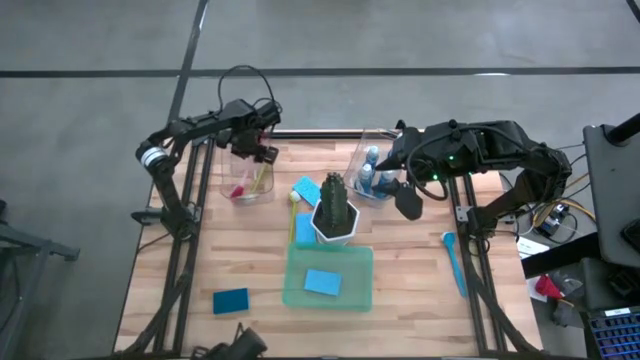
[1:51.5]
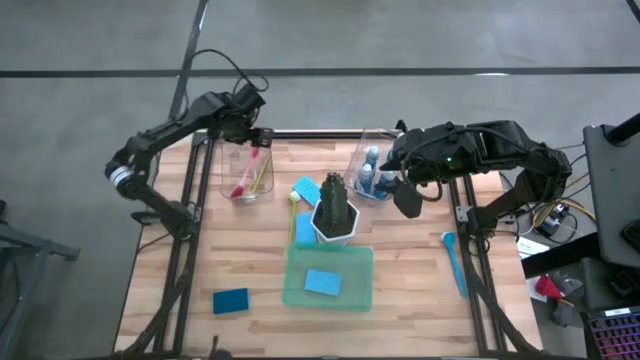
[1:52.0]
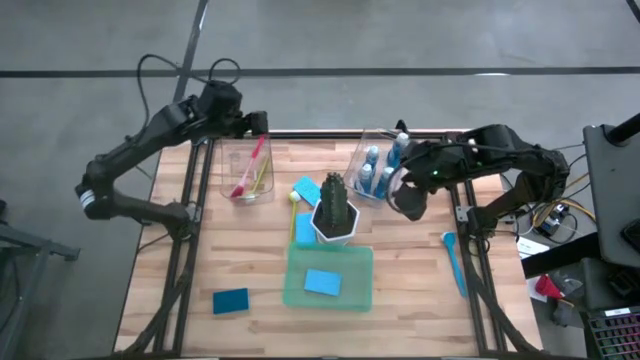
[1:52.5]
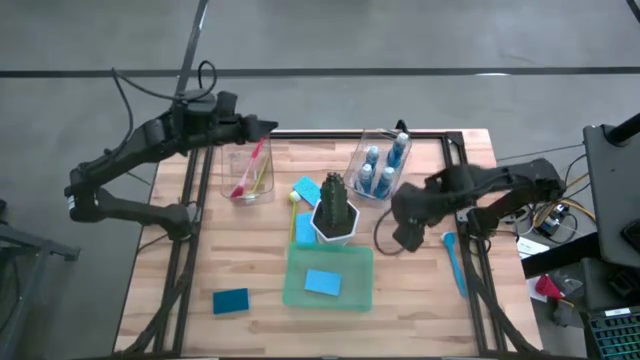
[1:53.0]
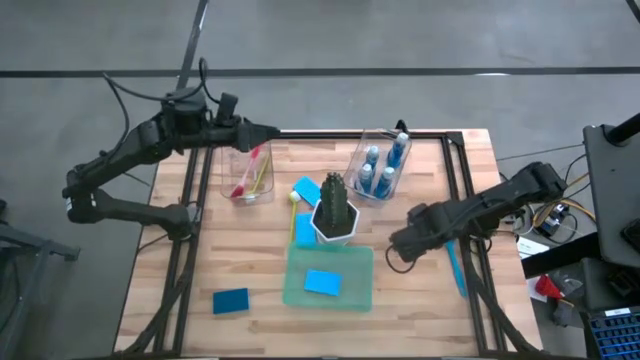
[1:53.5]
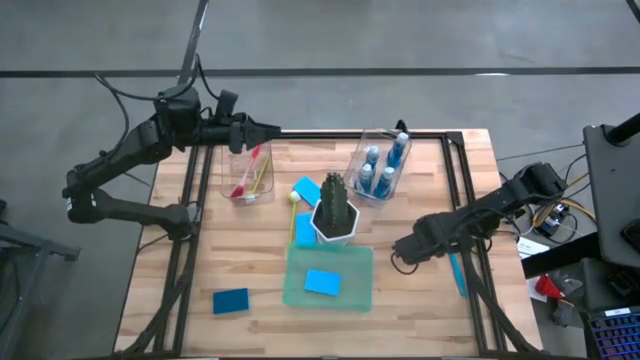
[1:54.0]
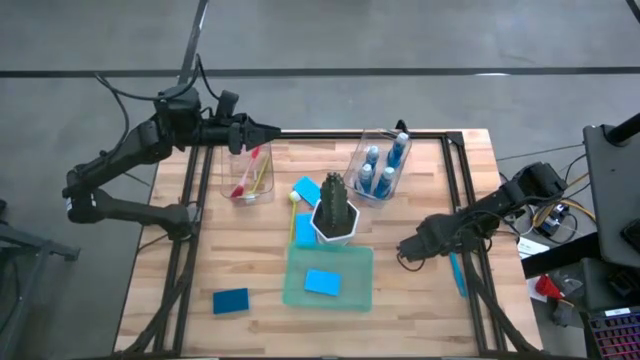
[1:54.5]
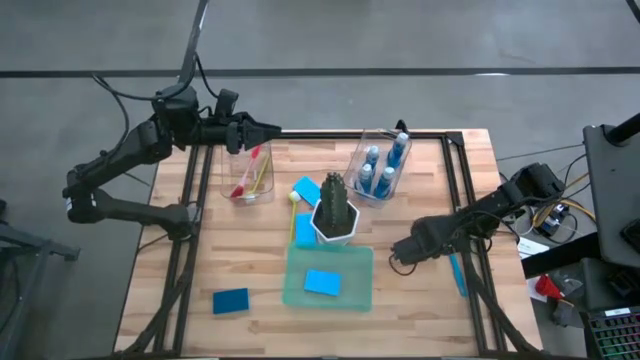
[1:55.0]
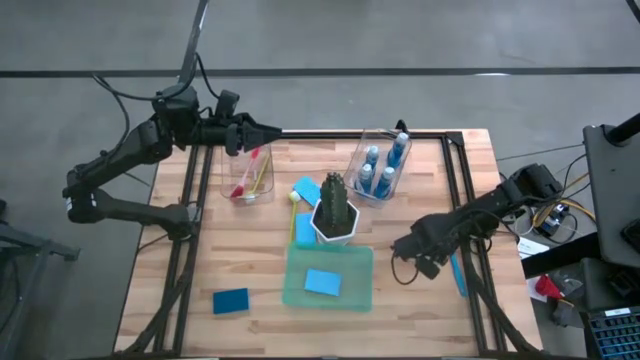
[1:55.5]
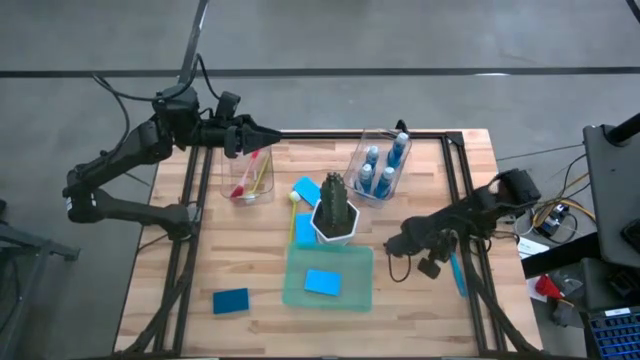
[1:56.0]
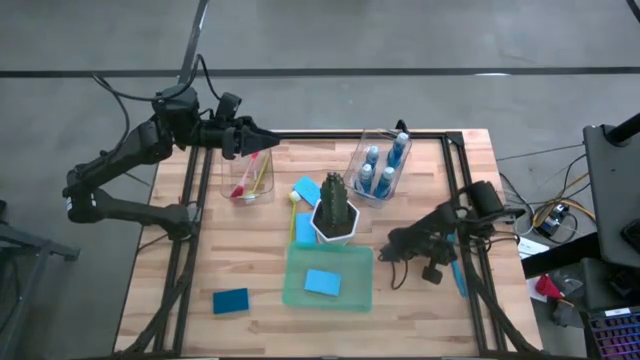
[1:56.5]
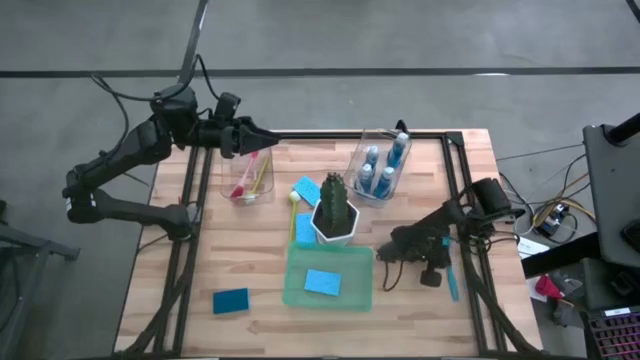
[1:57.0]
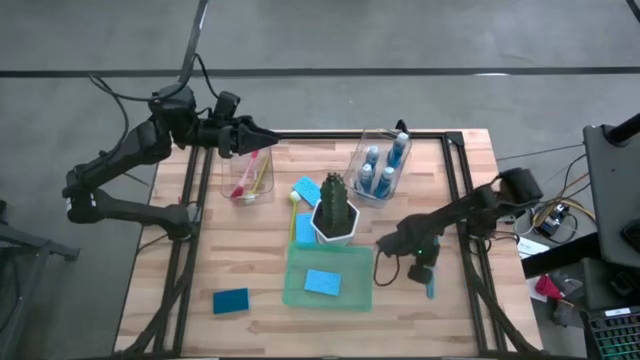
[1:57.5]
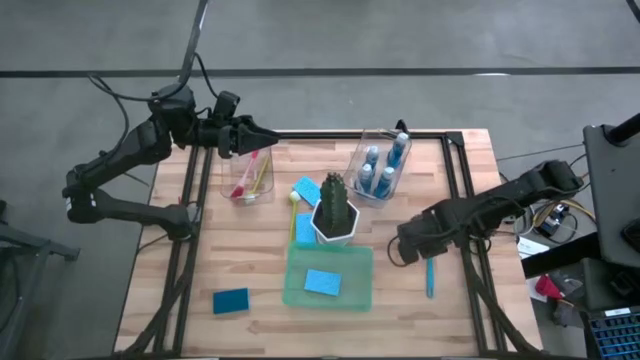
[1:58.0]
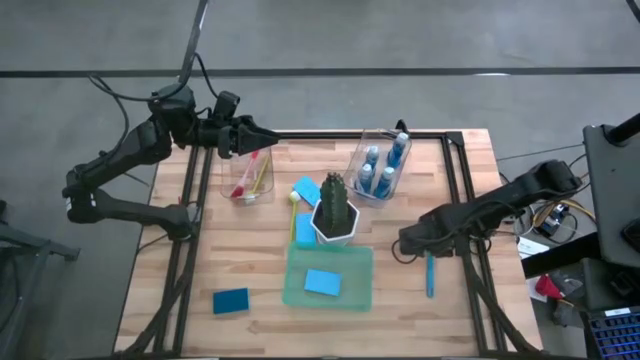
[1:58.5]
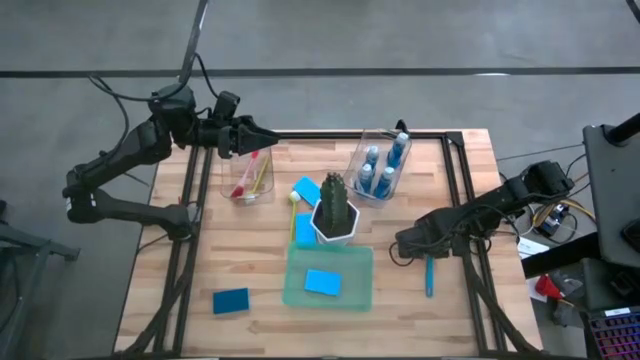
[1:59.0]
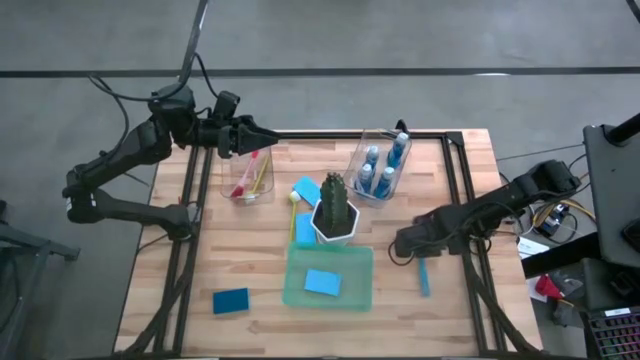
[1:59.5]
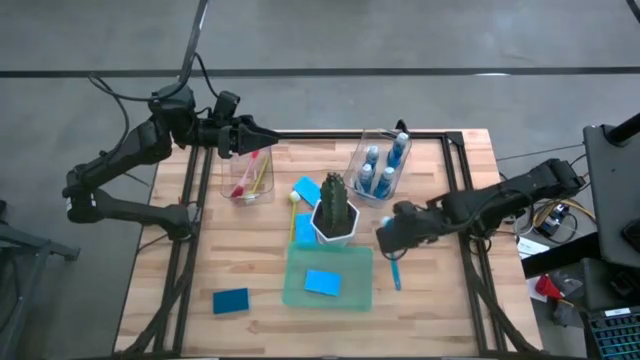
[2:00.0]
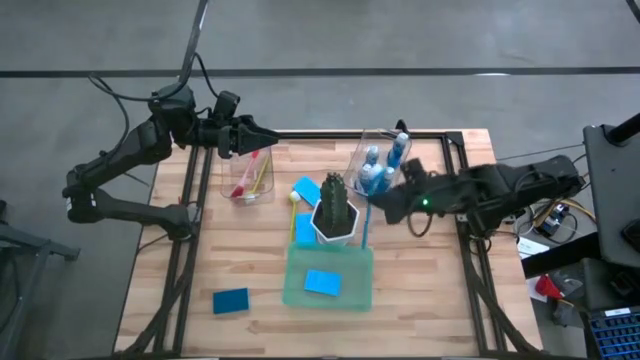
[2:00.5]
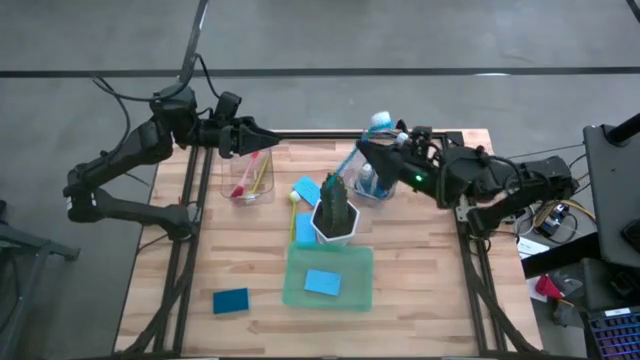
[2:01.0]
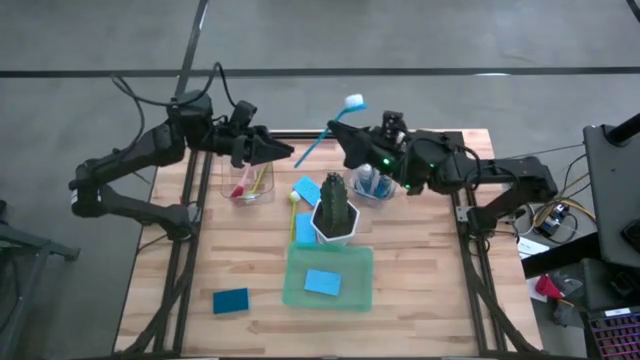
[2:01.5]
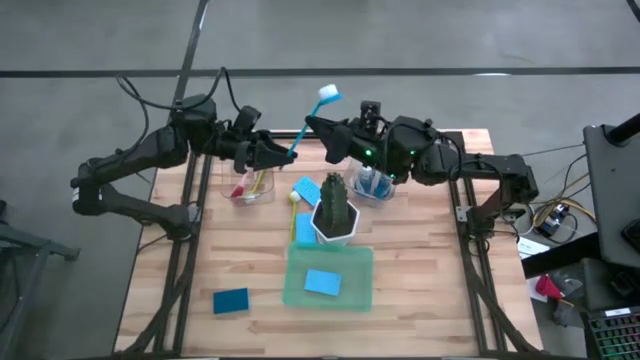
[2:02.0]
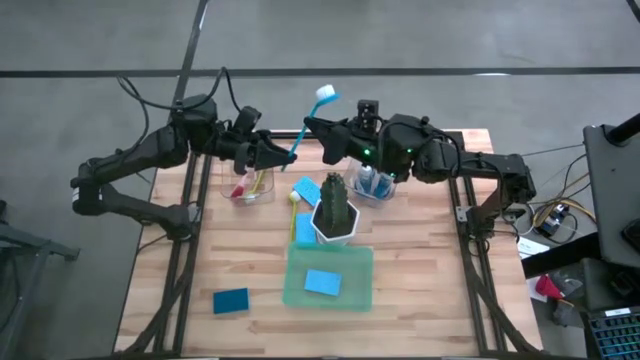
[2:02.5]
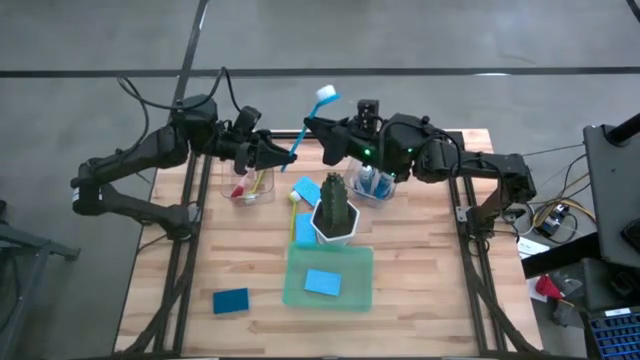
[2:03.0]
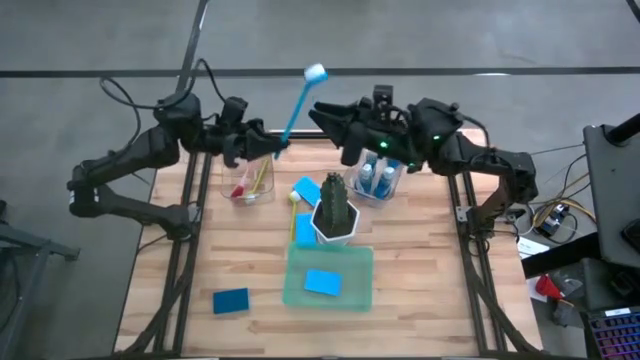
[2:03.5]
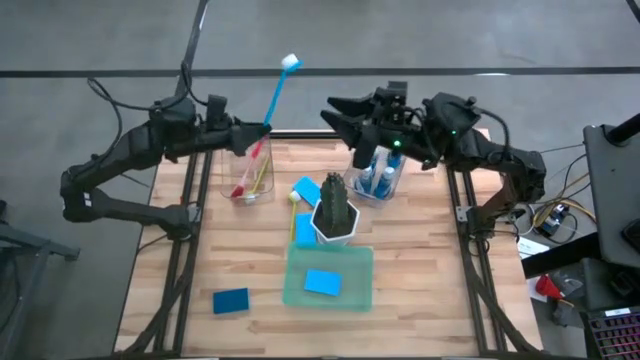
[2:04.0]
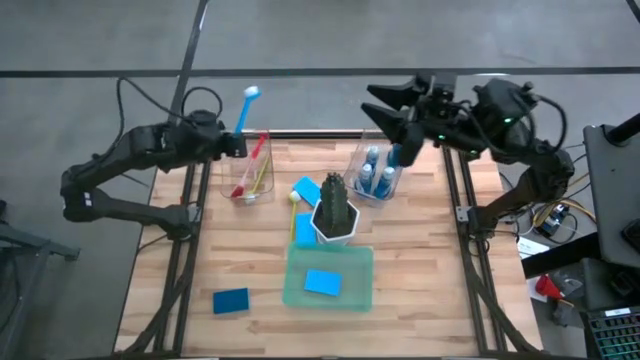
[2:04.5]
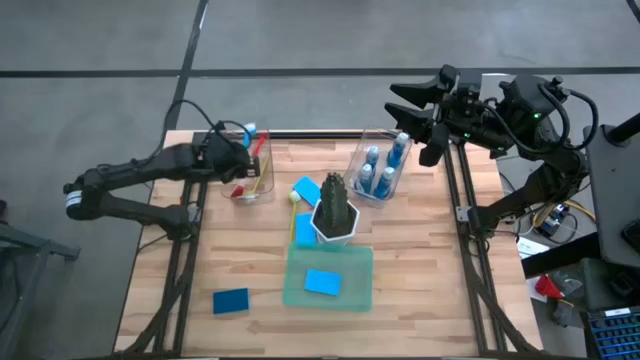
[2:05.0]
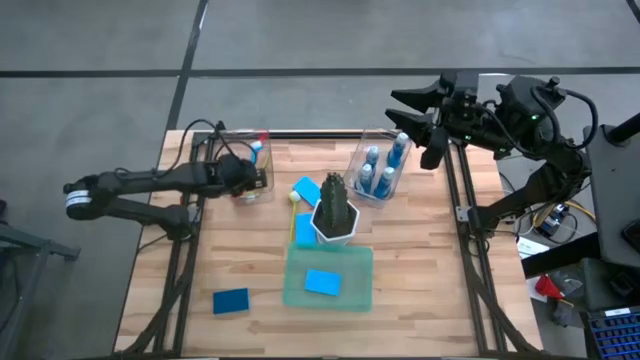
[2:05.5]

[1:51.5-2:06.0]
Task: Pick & Place Kitchen Sink Supplies
Put the light blue dish brush into the left transparent bin

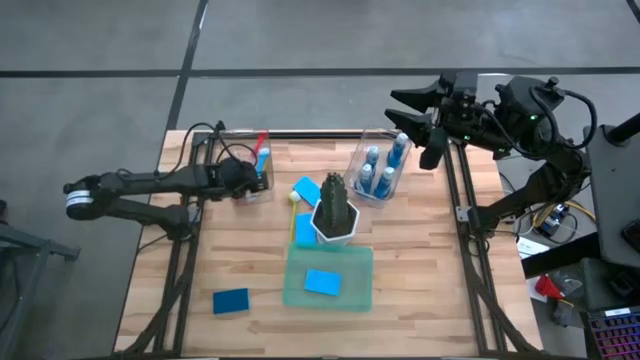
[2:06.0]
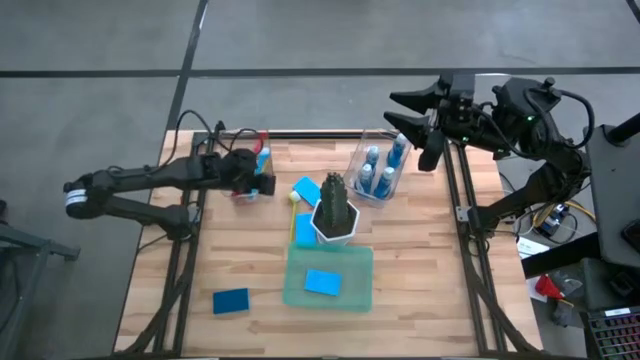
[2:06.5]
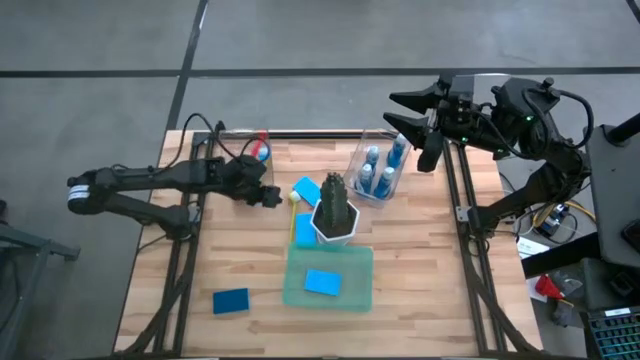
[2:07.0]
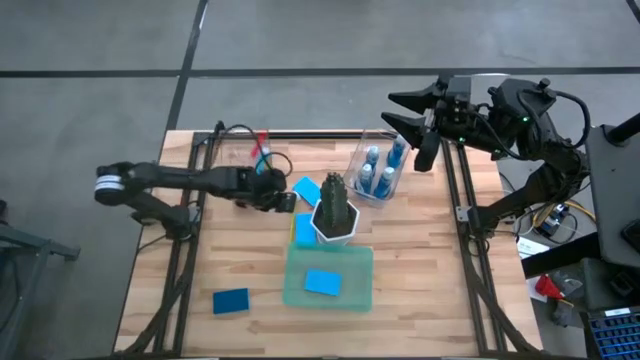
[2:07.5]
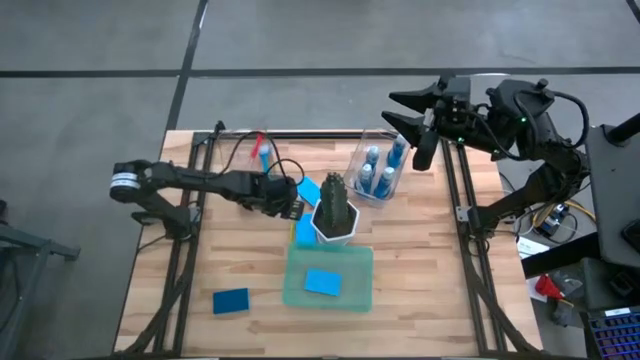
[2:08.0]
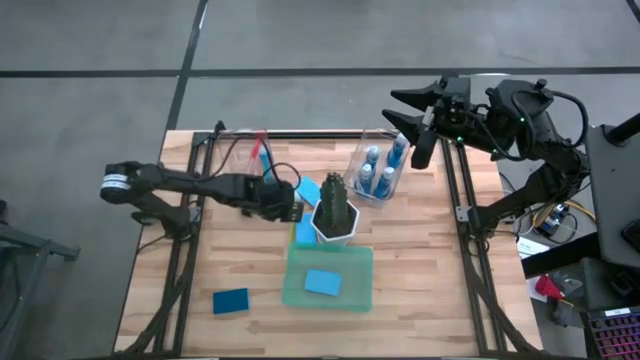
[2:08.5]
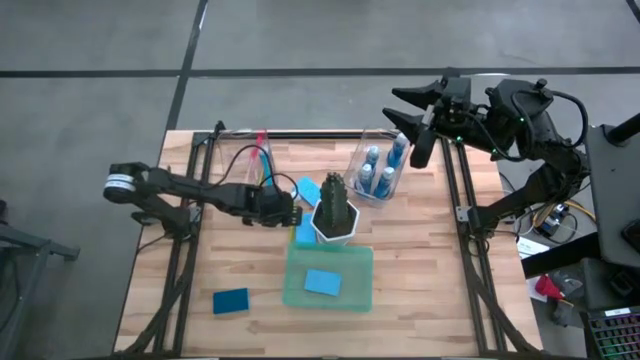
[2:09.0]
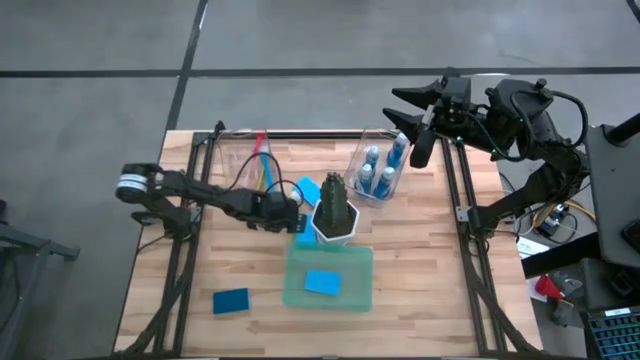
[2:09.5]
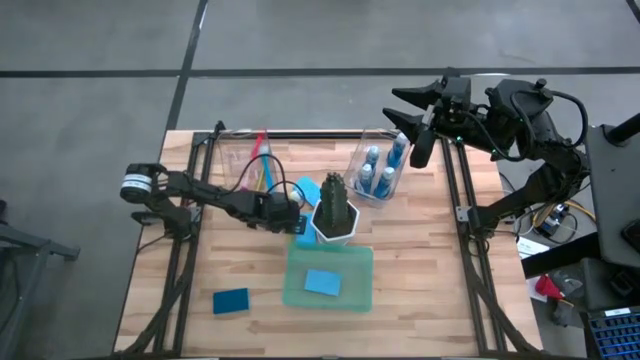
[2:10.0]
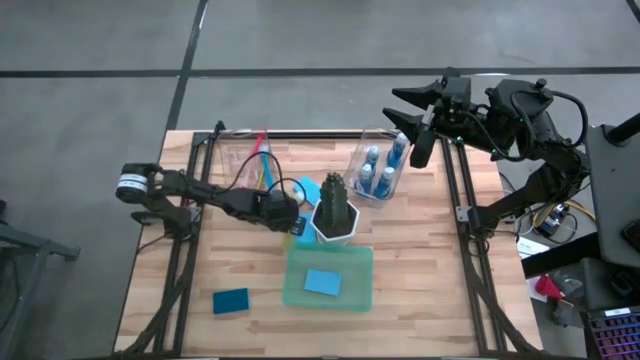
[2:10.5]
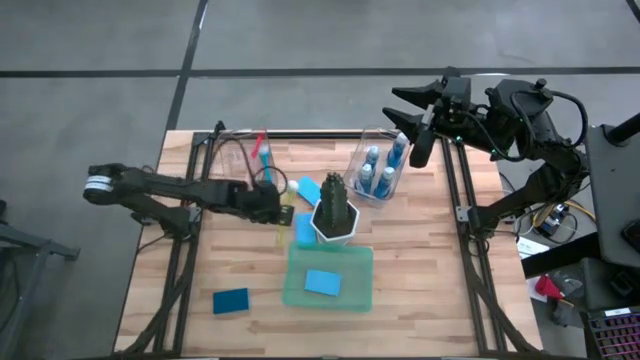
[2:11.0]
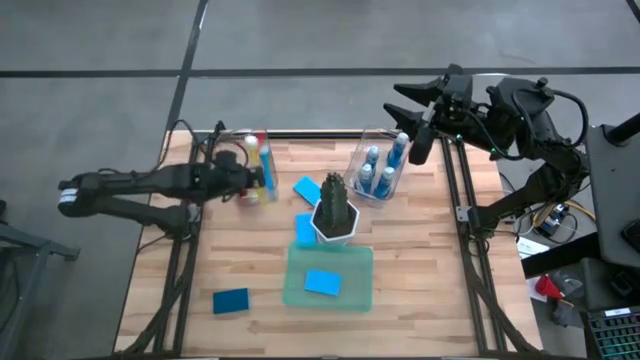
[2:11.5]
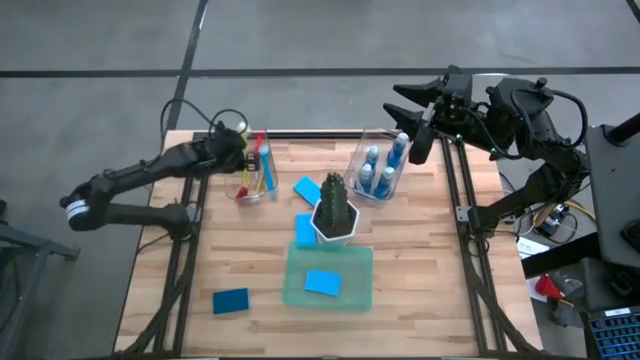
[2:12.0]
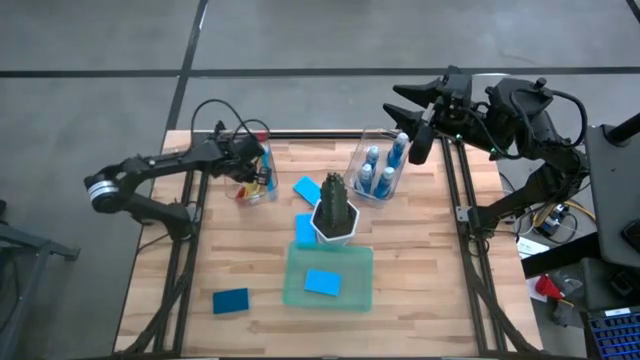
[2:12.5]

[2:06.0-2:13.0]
Put the green dish brush into the left transparent bin

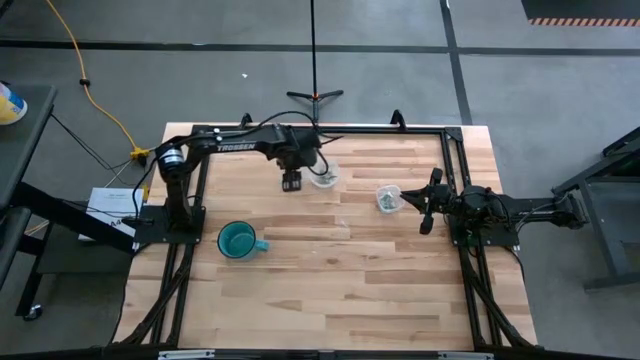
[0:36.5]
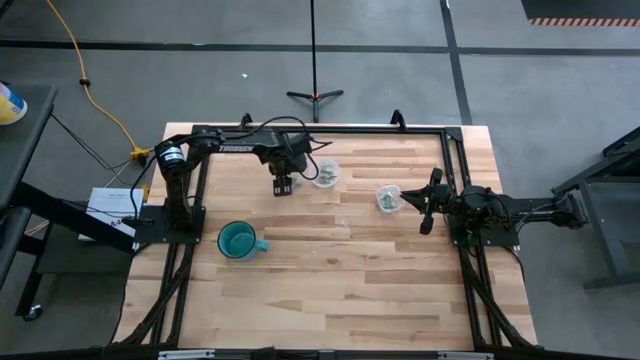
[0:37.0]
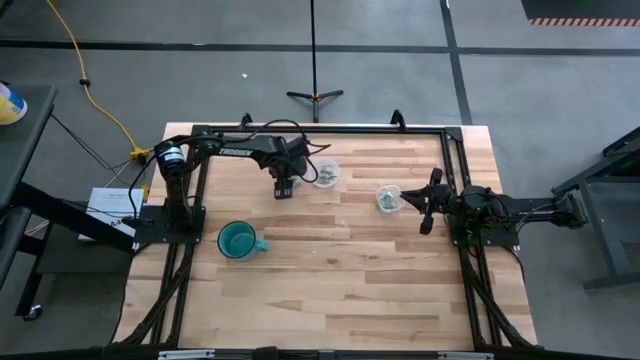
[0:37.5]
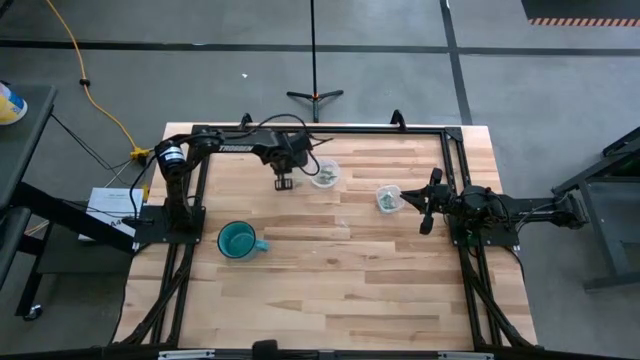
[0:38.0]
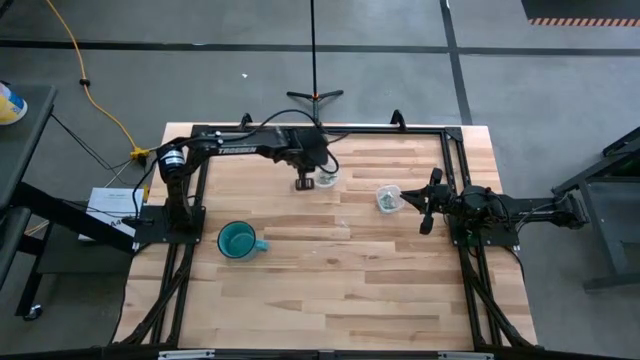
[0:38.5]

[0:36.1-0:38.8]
Task: Pick and place items into bin
Put the stevia packet into the top transparent bin
